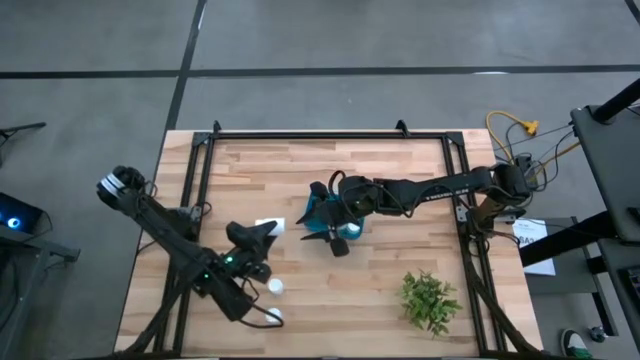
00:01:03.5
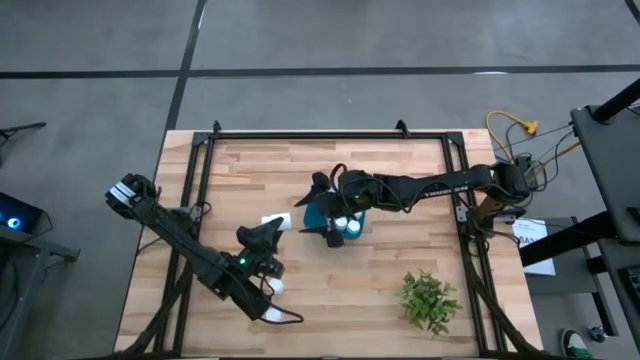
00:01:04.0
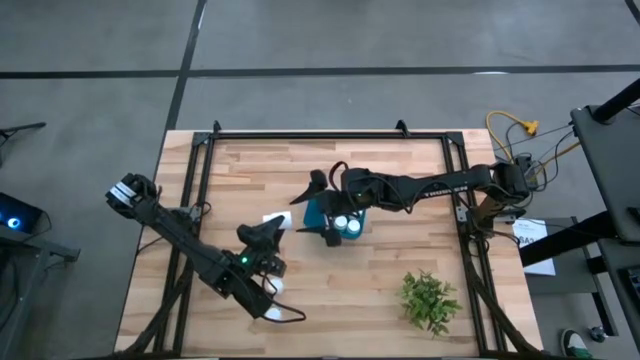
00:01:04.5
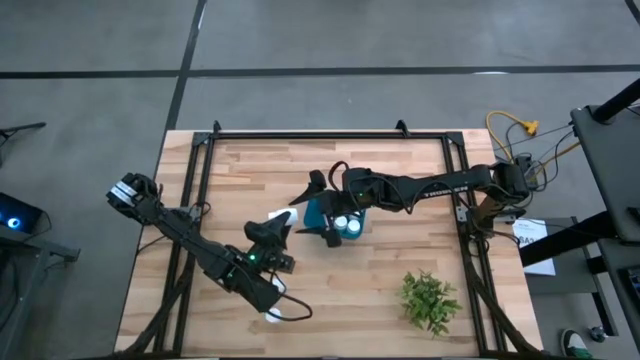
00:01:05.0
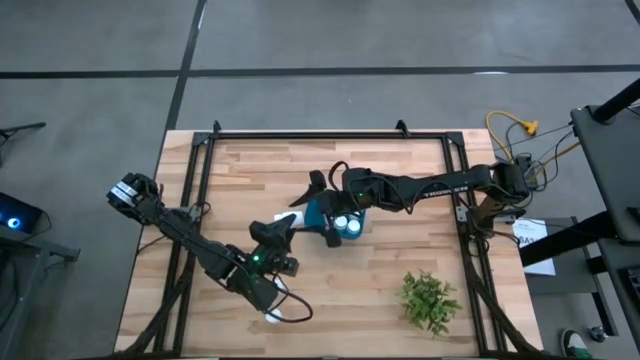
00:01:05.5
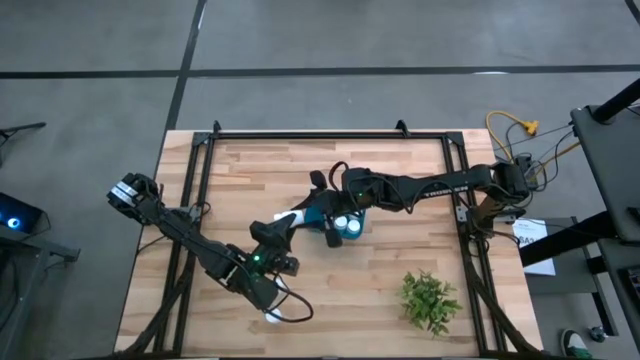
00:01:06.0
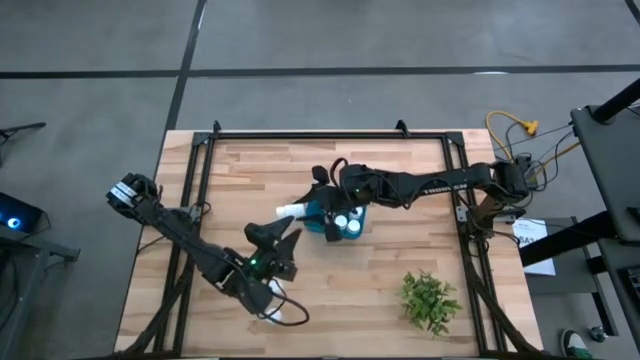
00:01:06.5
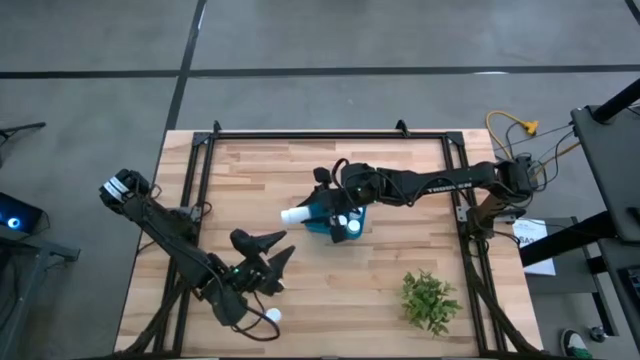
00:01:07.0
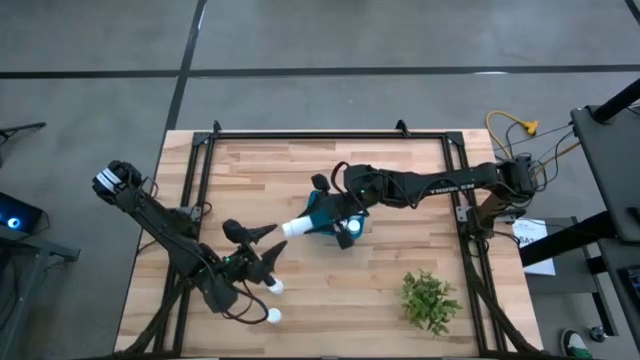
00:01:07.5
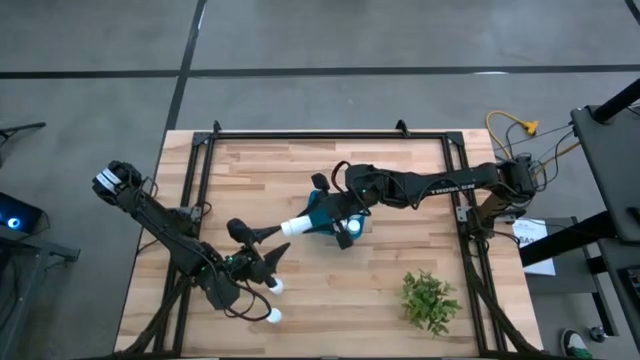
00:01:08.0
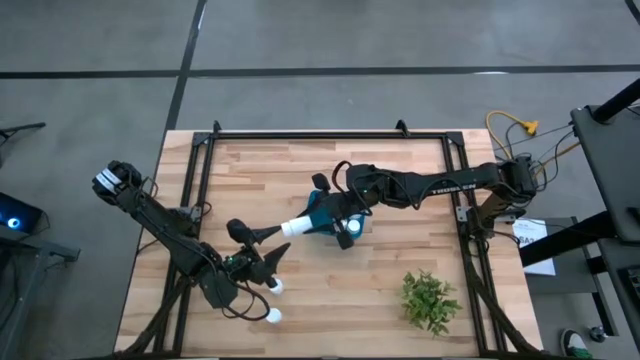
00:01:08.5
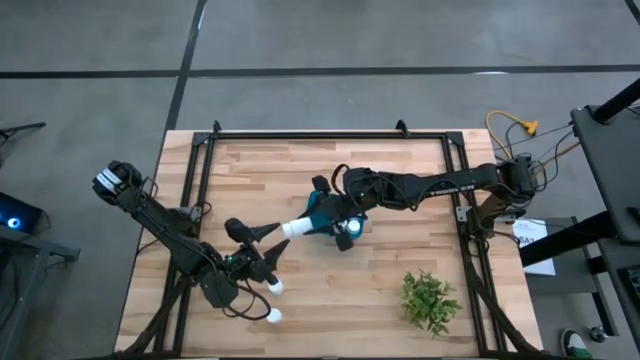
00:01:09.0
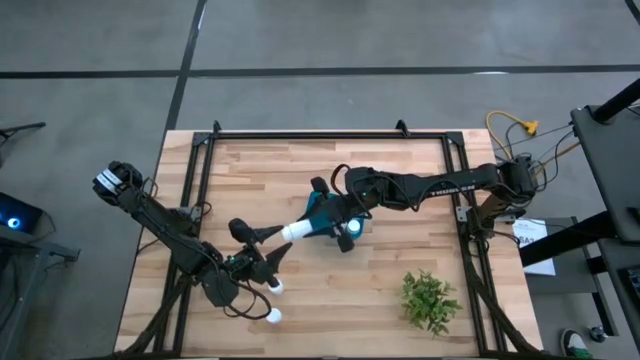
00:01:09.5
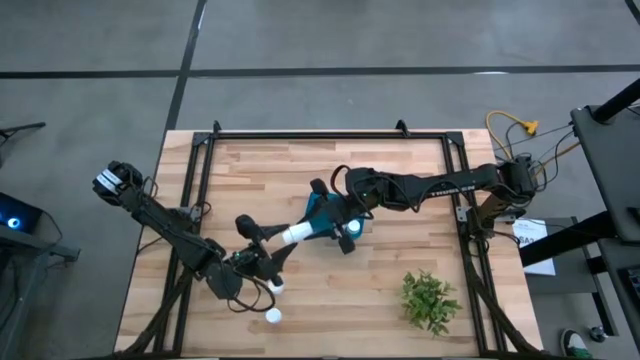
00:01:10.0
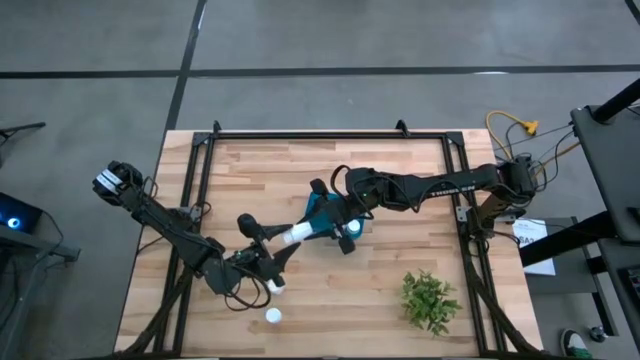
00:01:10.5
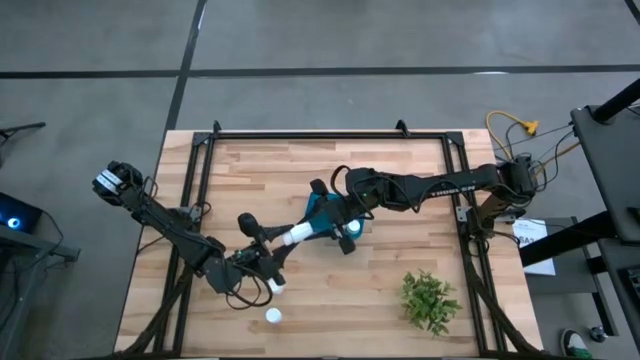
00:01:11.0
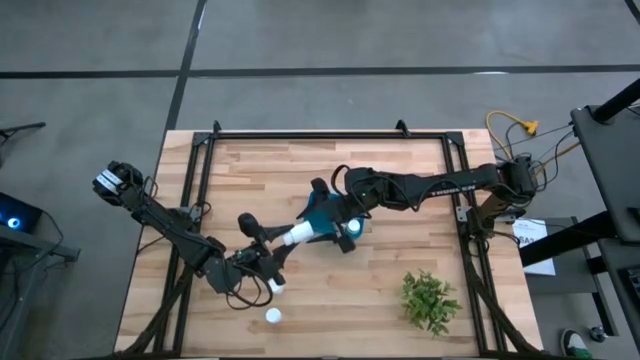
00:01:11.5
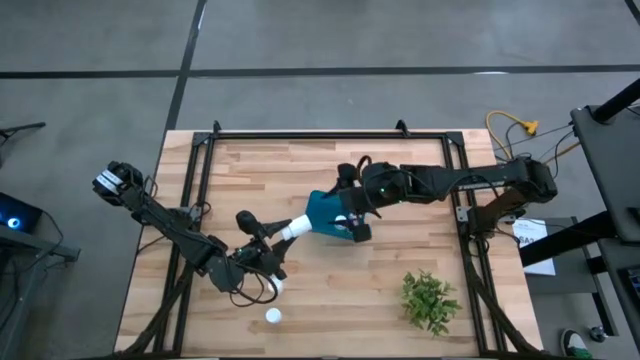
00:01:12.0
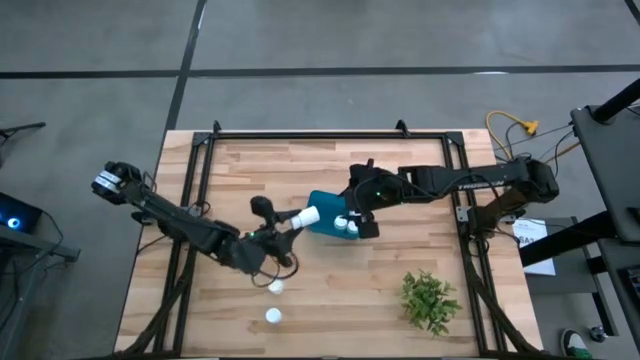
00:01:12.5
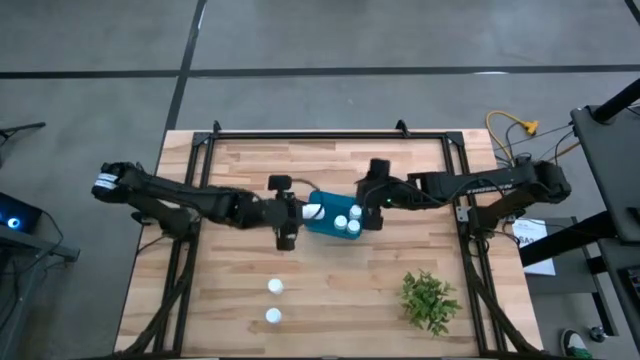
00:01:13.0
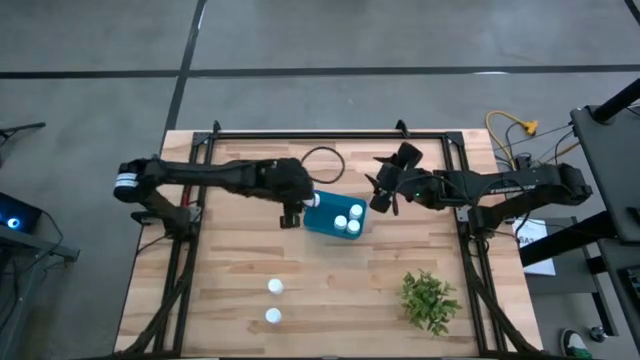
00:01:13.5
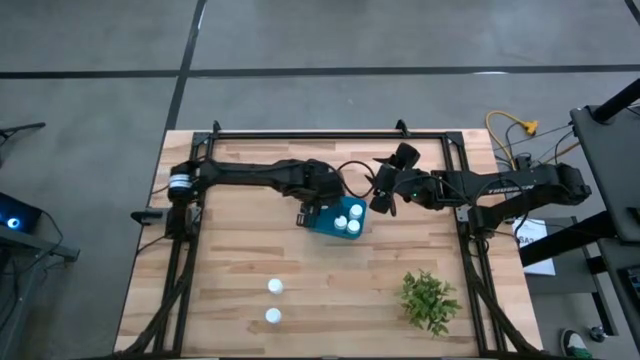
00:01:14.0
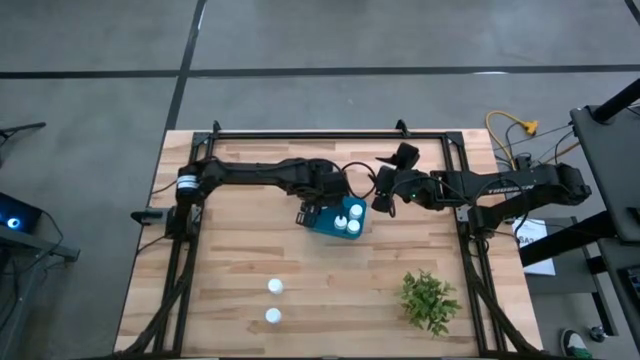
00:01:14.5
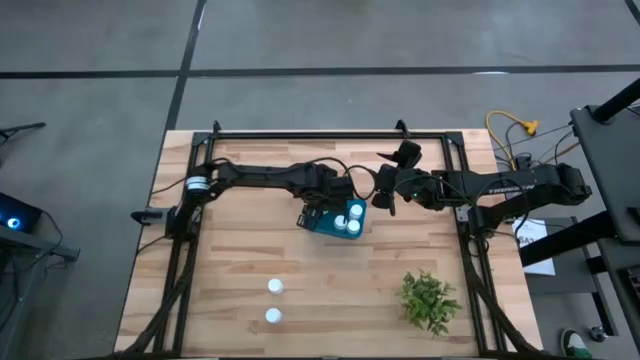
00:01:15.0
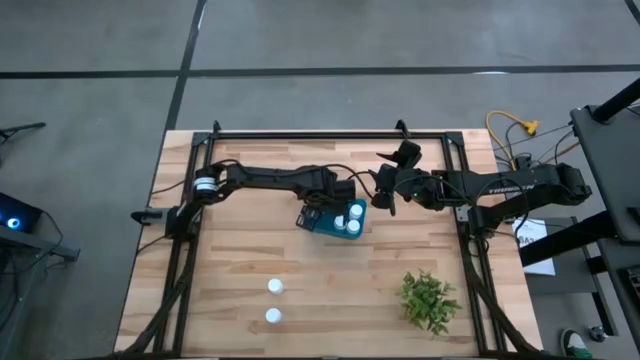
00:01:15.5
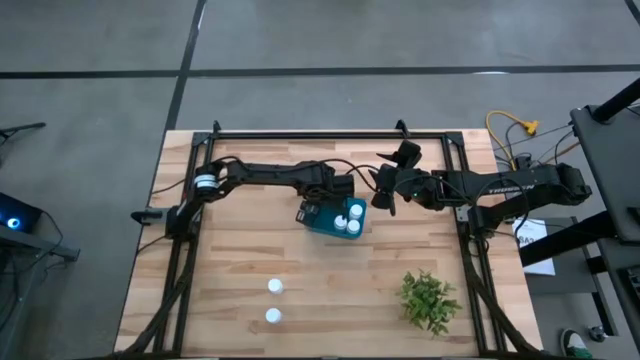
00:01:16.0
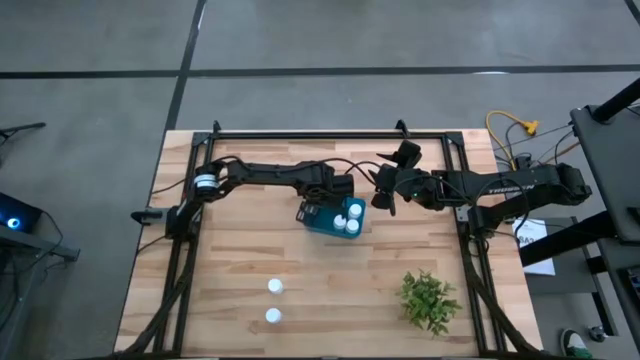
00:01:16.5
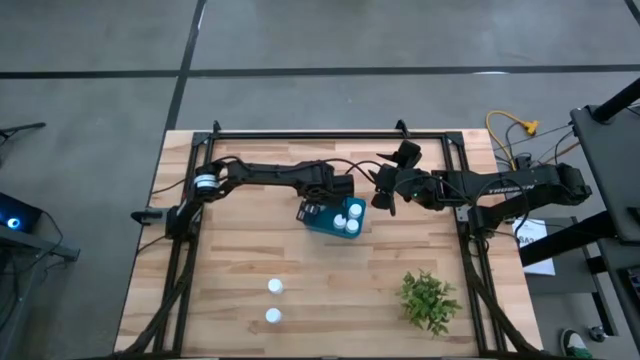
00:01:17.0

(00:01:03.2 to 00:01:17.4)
Task: Pick and place pill bottles into a basket
Put the white pill bottle into the blue bin
